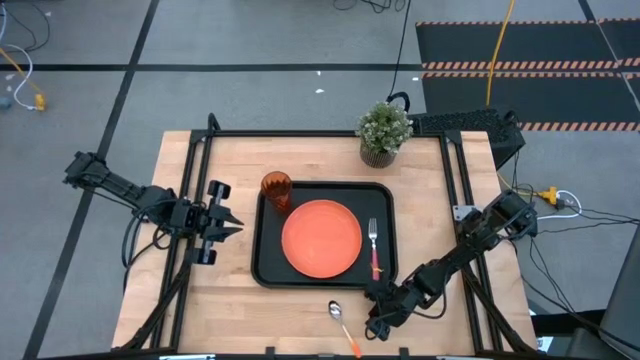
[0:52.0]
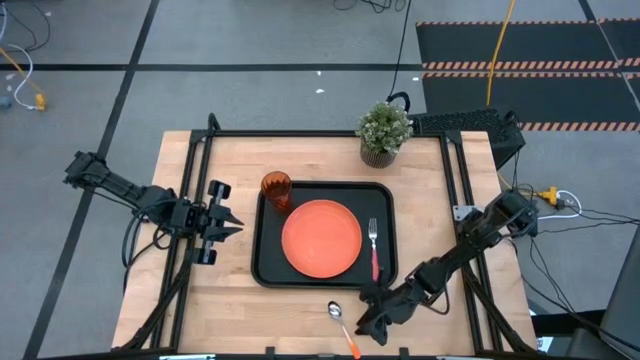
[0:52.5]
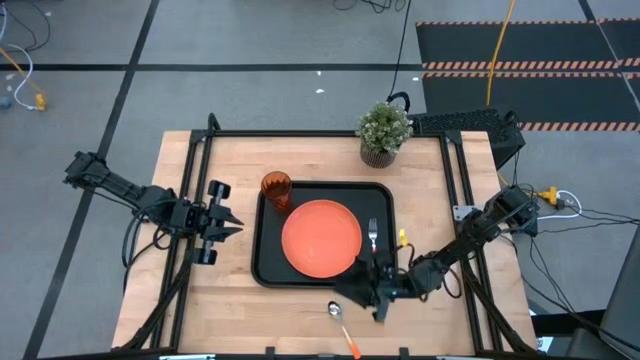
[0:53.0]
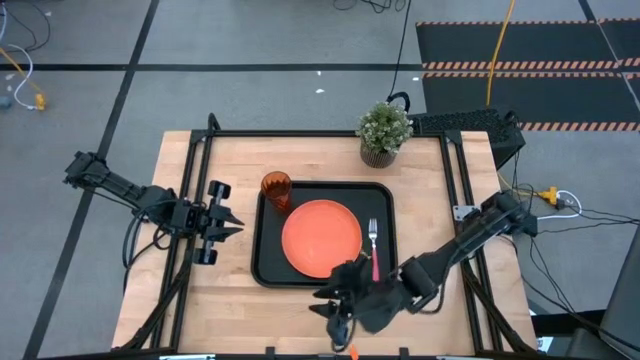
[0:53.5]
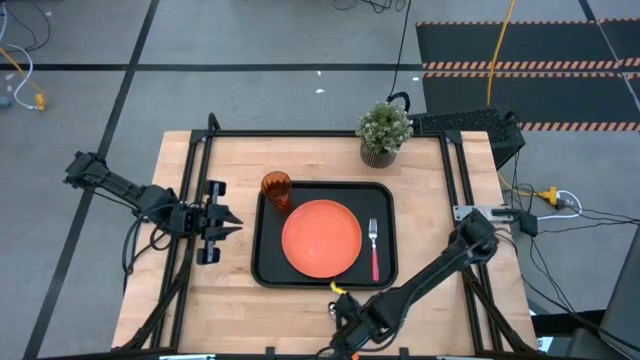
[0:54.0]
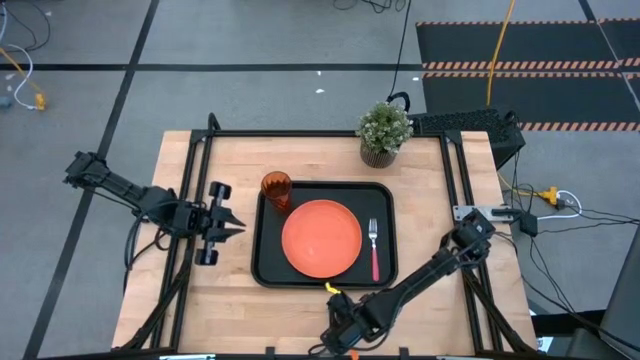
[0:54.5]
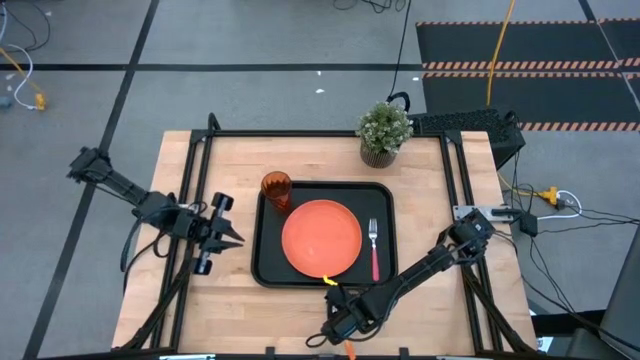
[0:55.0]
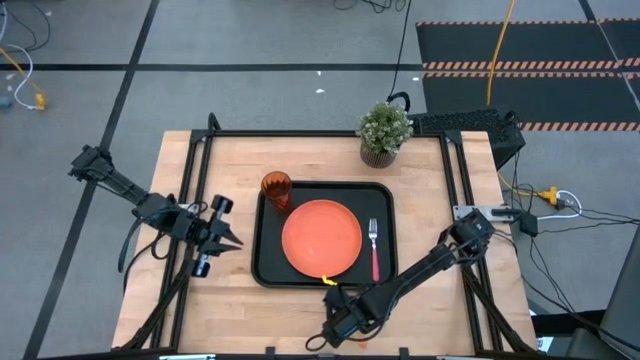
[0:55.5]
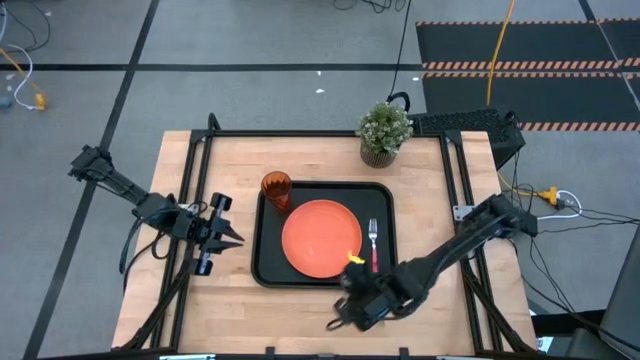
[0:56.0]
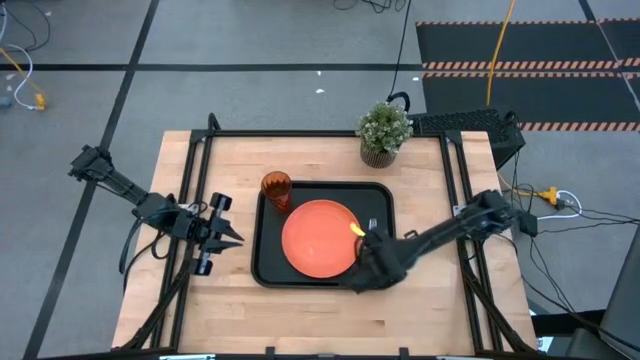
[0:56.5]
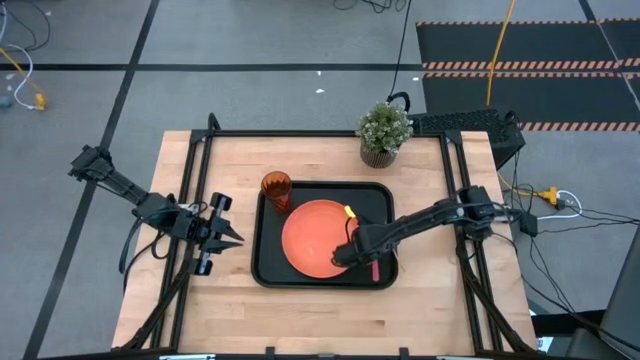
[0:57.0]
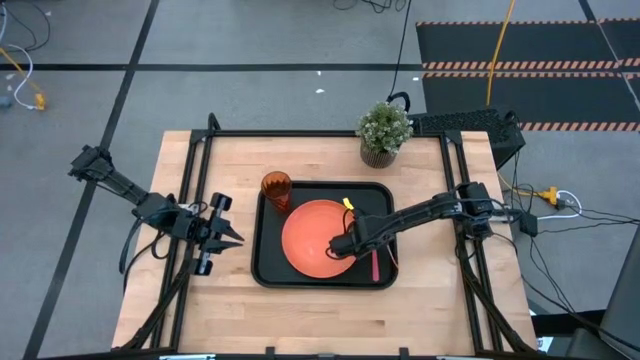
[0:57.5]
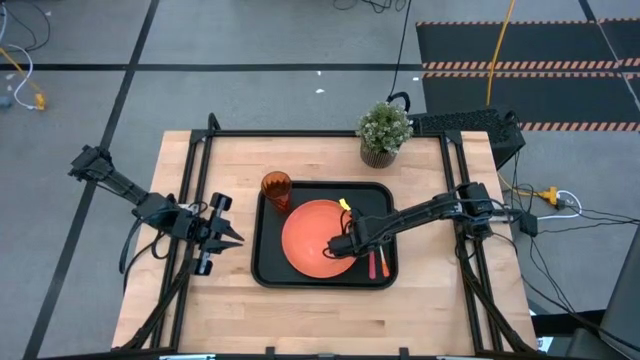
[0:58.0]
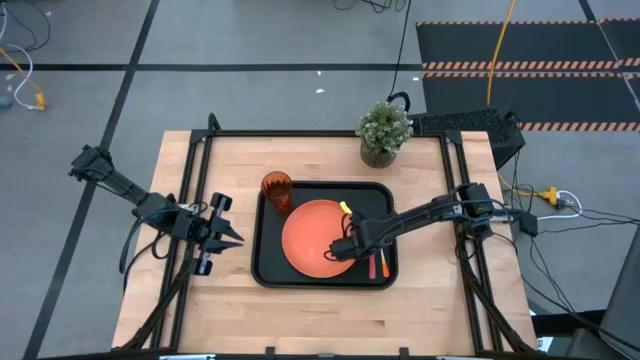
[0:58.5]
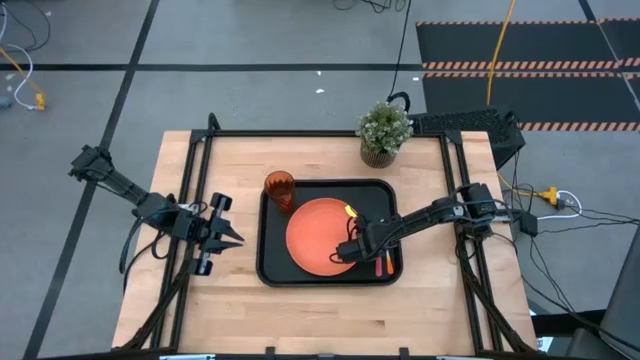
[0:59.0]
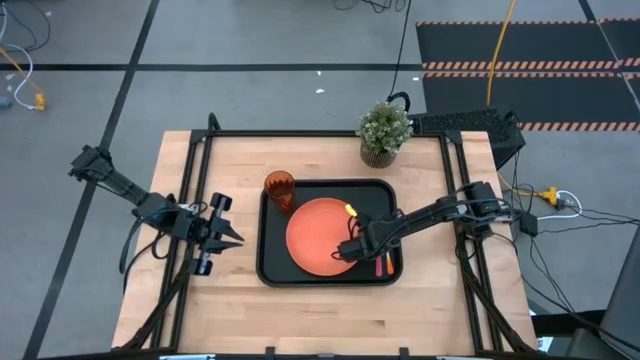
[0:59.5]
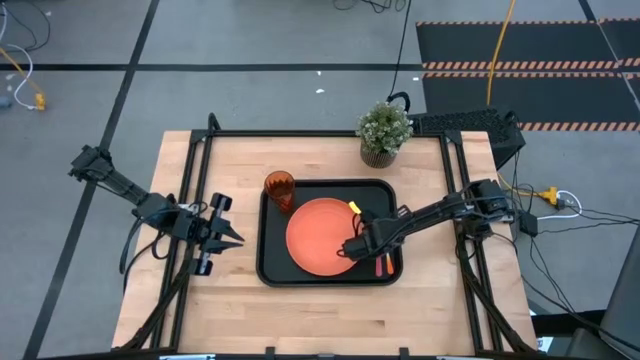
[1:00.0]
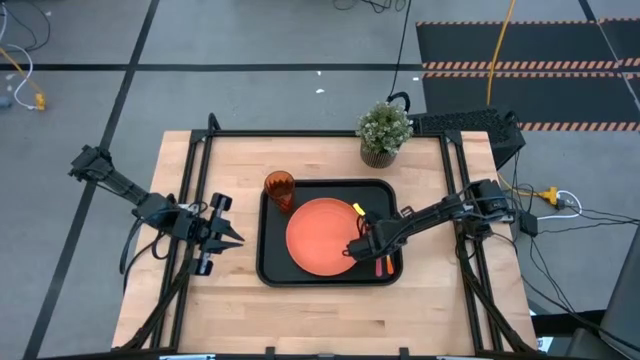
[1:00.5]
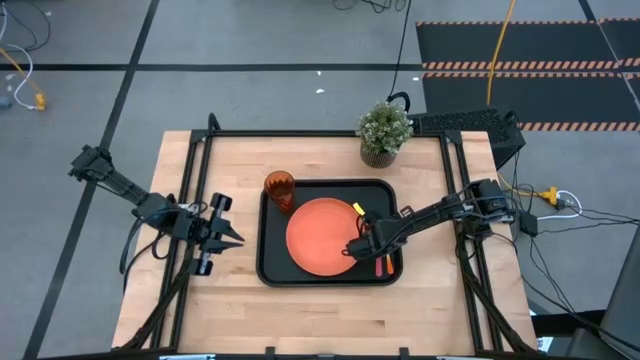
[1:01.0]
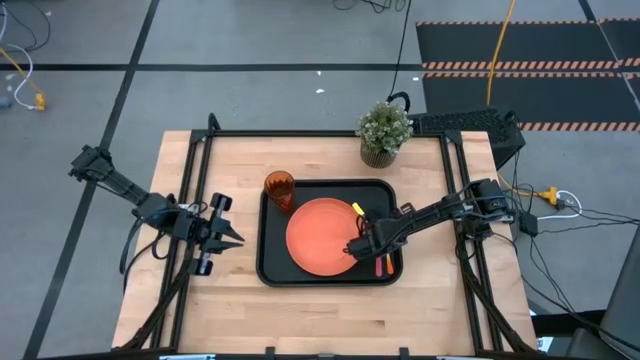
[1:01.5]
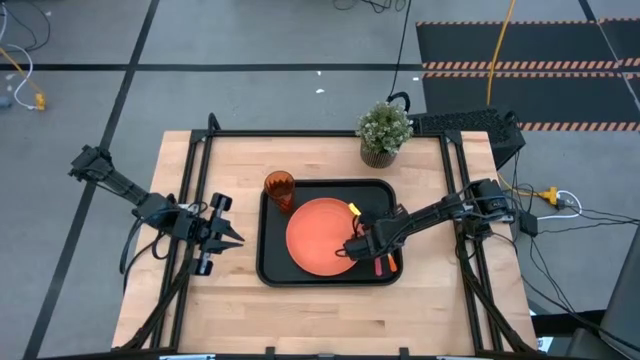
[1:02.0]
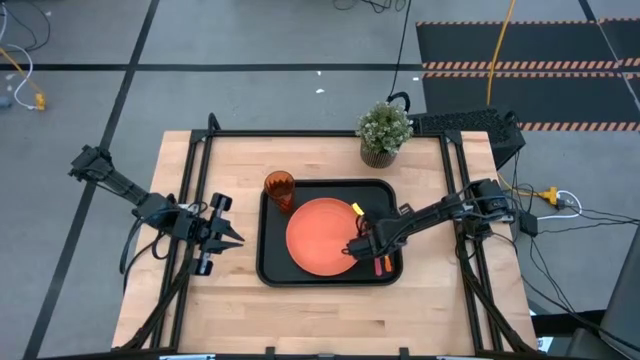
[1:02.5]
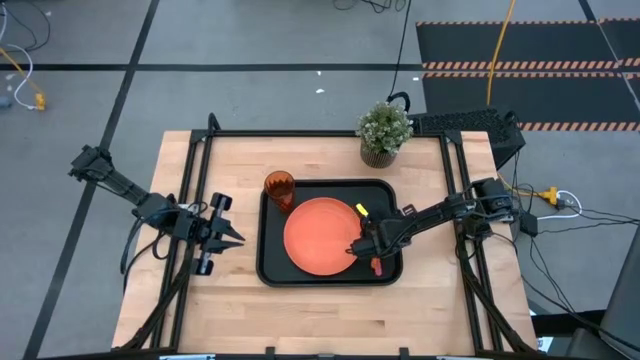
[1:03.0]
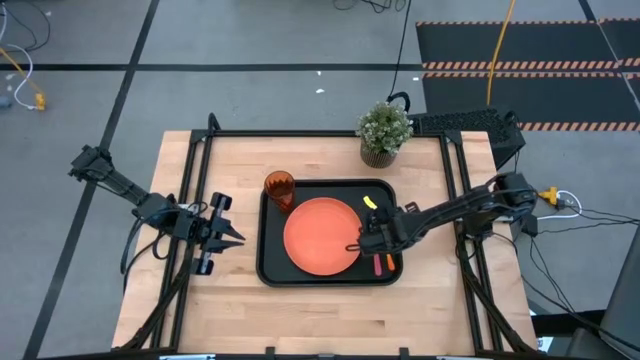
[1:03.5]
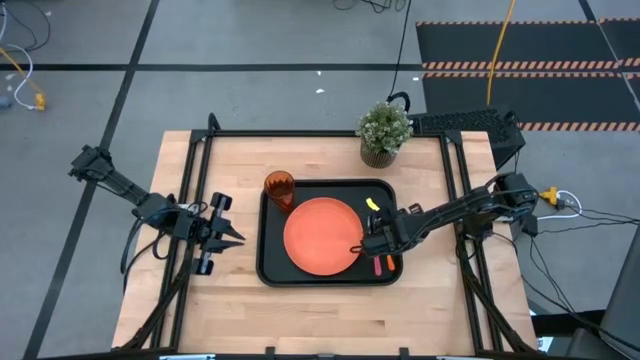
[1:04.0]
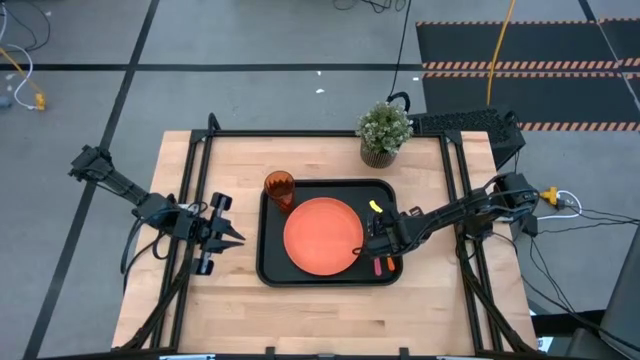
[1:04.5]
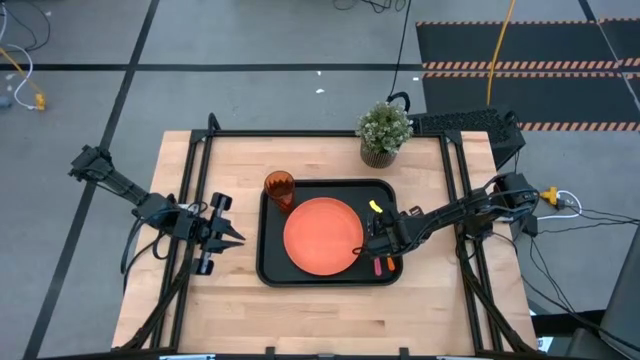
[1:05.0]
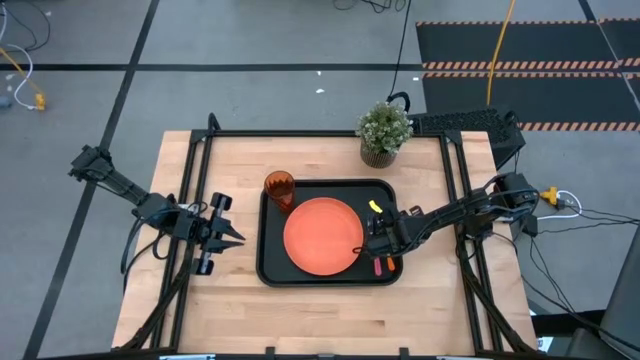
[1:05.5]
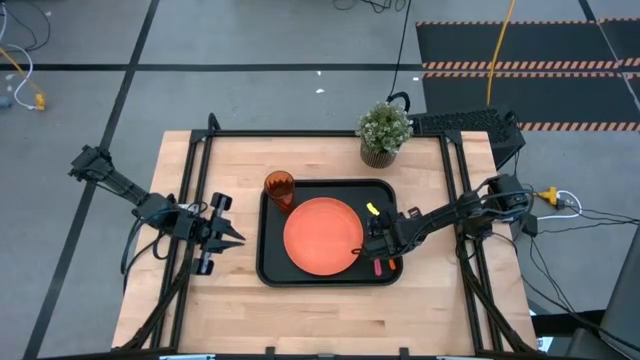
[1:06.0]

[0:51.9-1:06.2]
Task: Pick and place plate/cup/fork/spoon on tray
Put the orange spoon on the black serving tray

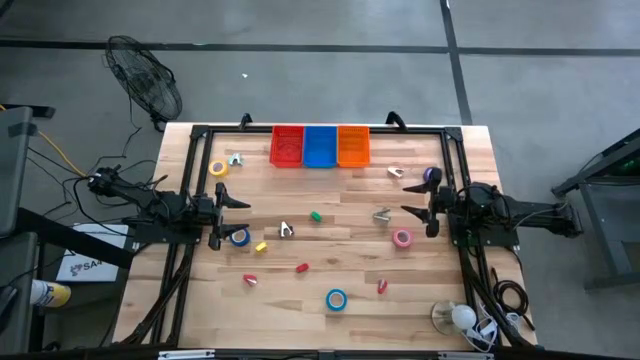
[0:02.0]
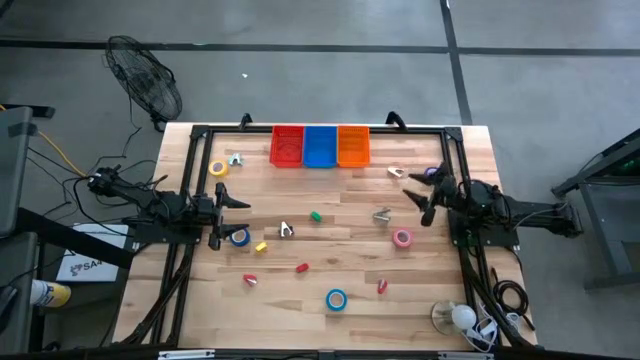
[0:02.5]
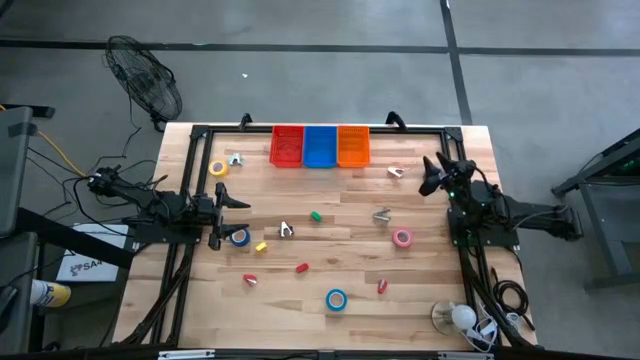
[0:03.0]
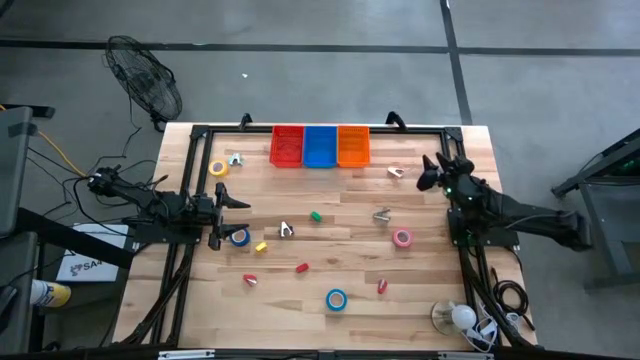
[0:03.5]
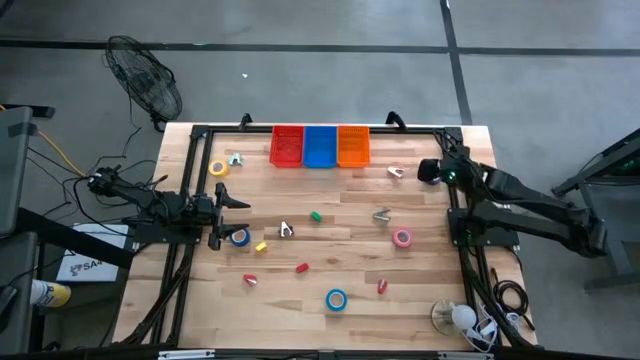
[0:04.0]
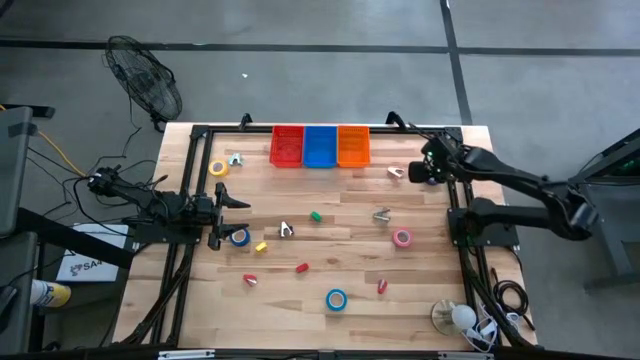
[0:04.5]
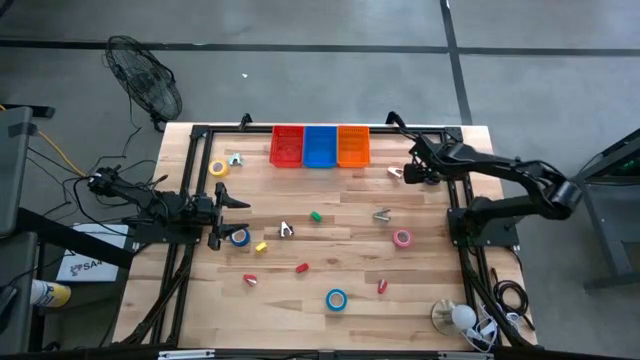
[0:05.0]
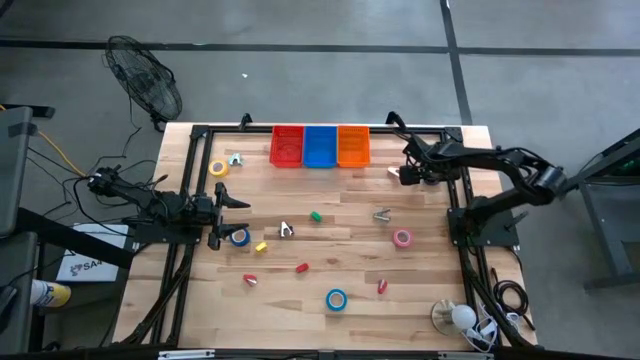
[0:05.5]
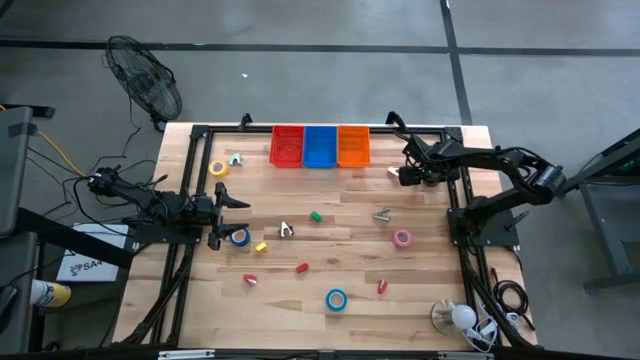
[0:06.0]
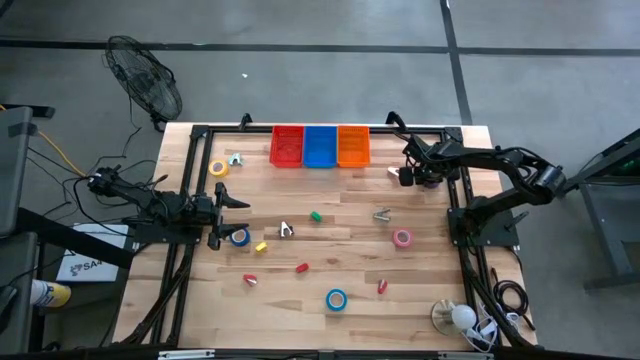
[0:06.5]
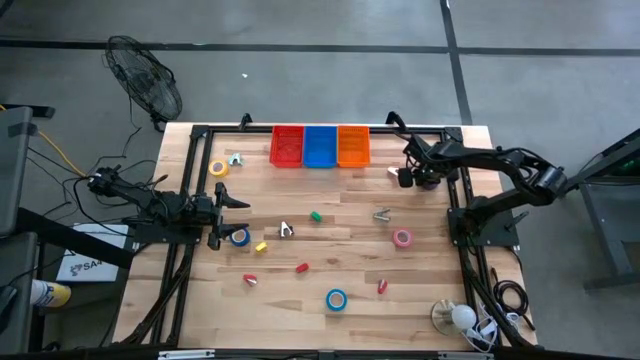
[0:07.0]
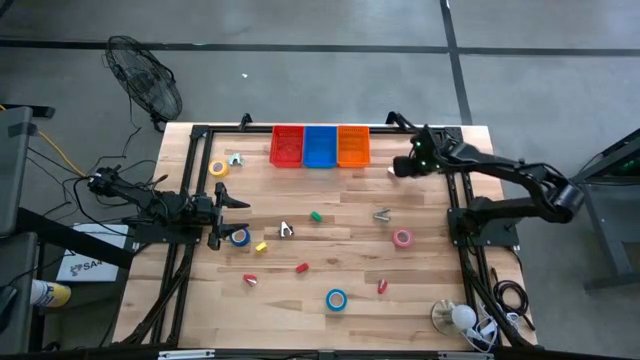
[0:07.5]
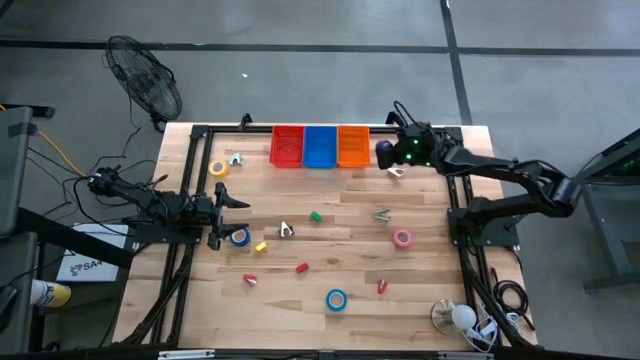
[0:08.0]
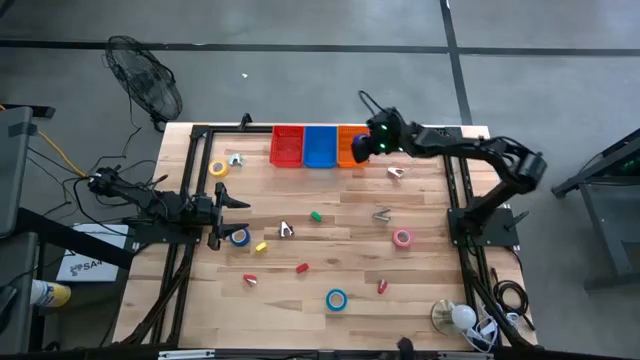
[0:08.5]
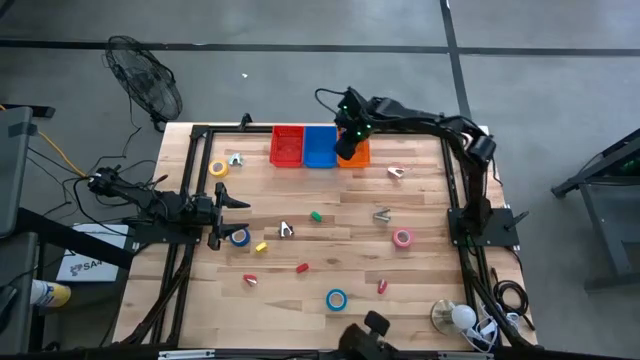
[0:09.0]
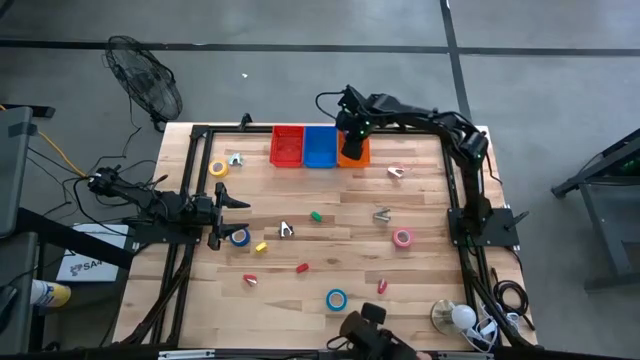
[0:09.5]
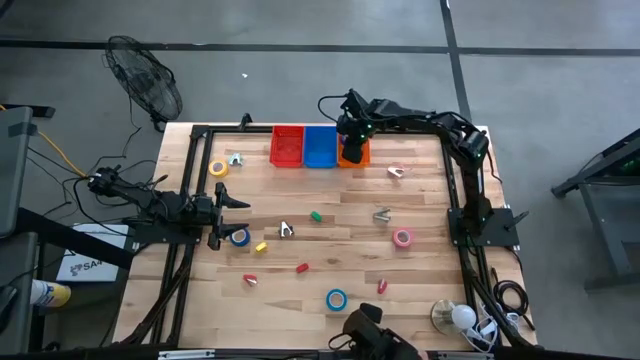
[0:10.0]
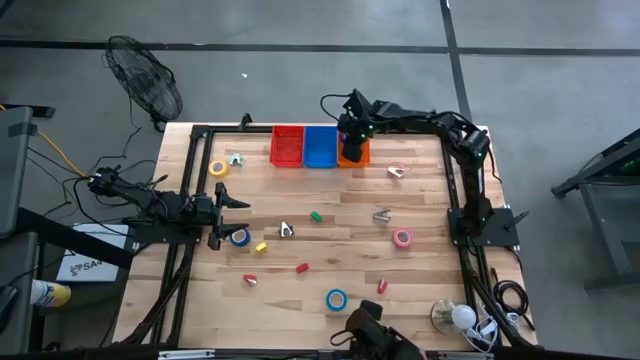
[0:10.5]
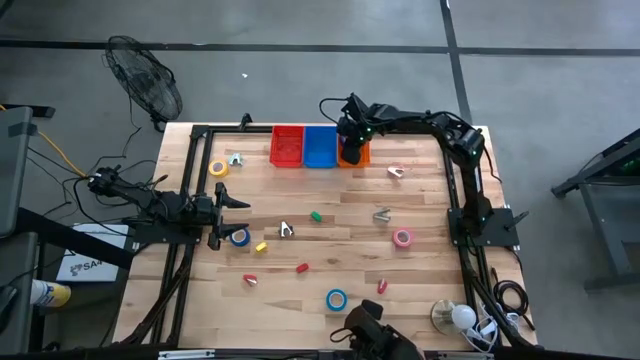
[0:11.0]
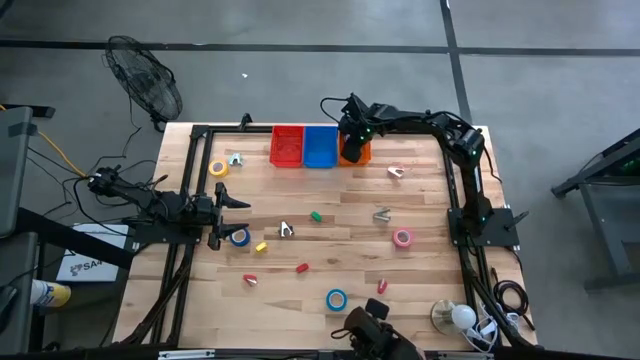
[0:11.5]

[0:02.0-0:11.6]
Task: Pick and place Stapler, Stapler remover, tape
Put the top blue tape into the orange bin
